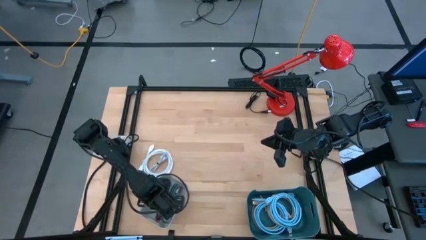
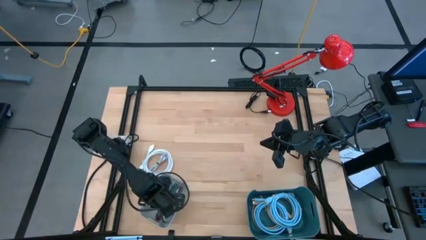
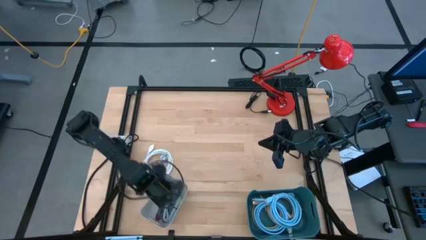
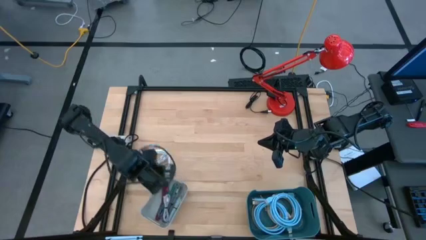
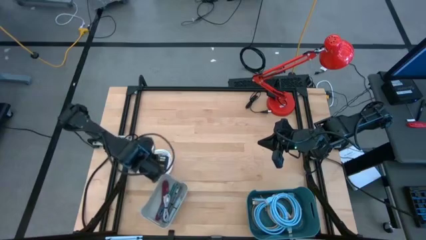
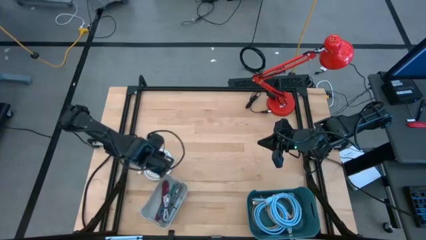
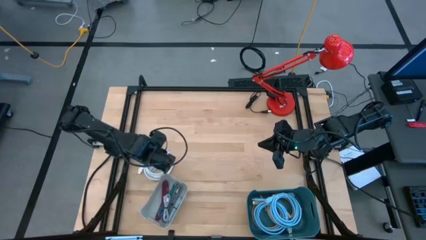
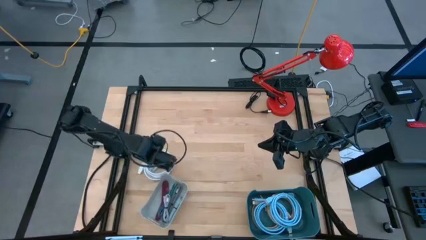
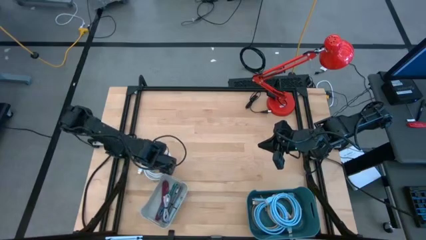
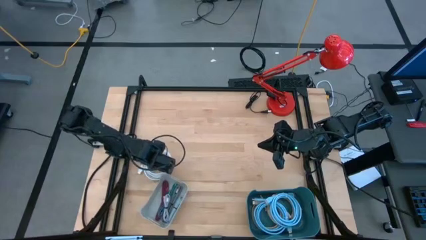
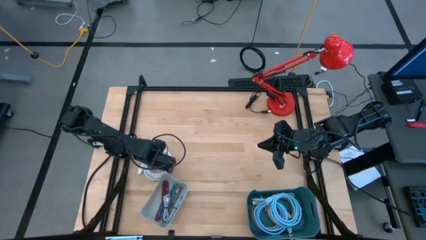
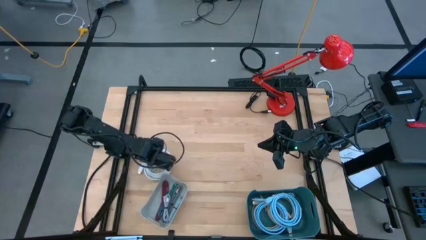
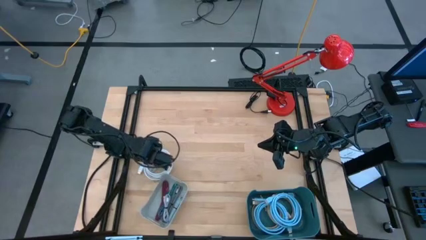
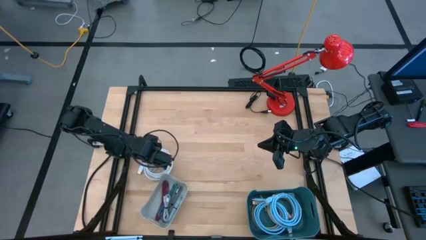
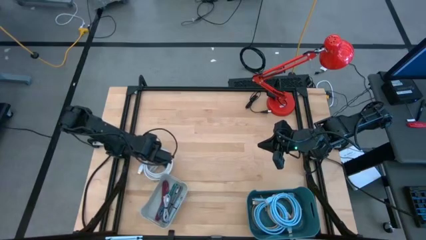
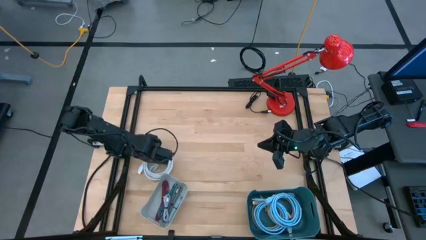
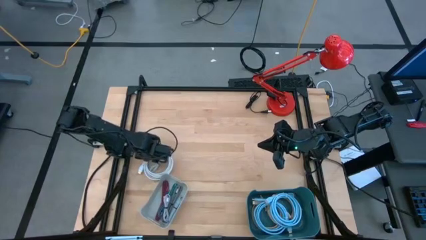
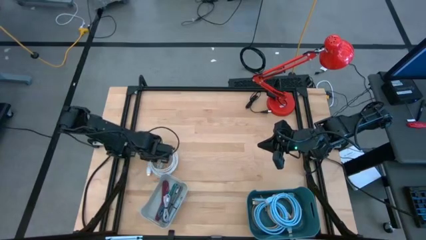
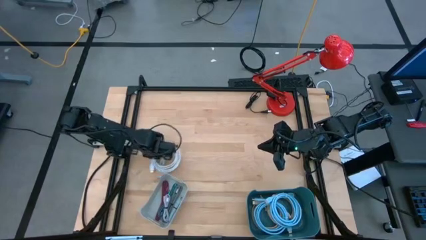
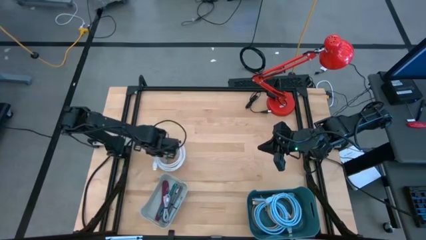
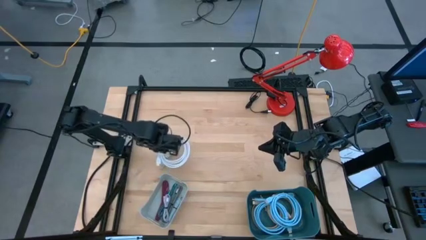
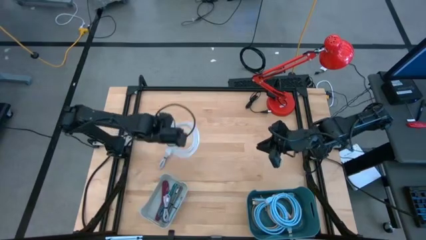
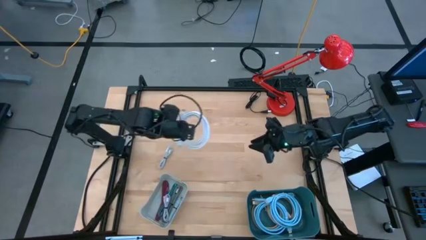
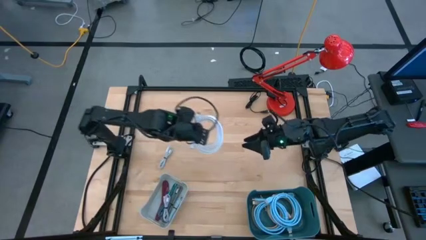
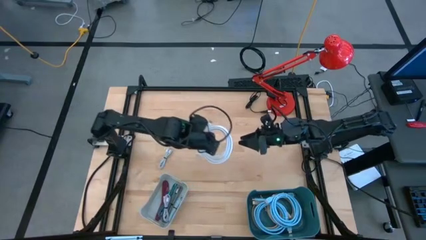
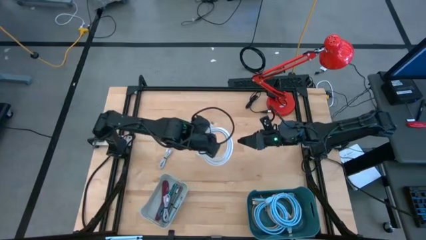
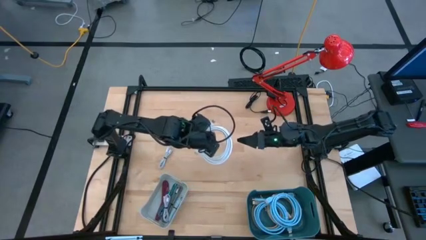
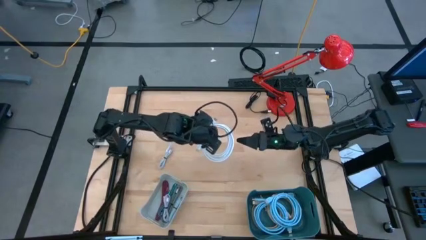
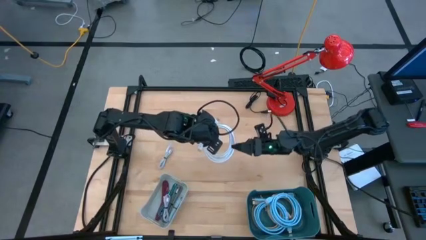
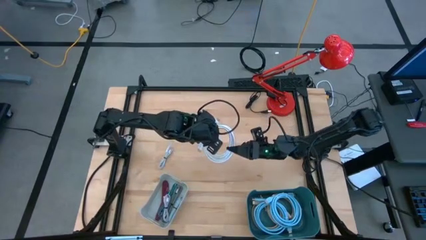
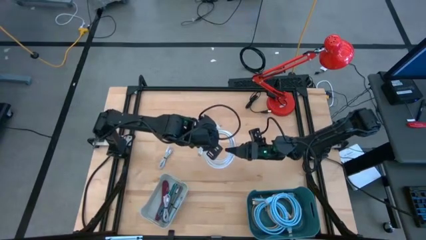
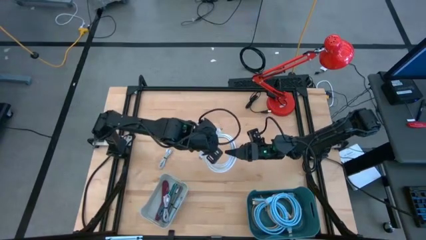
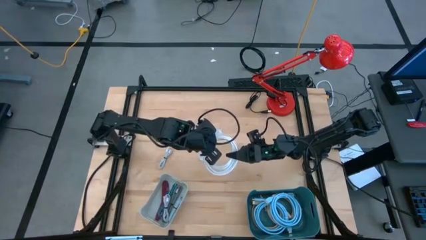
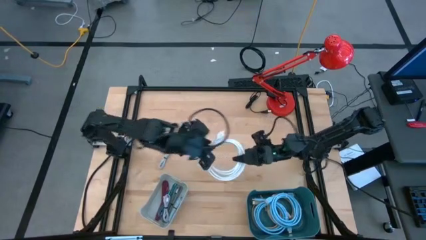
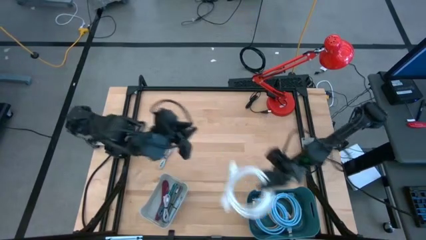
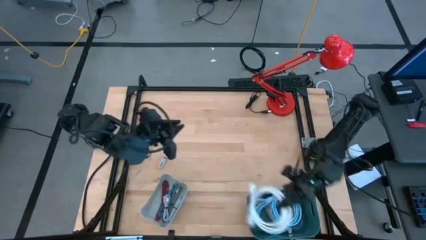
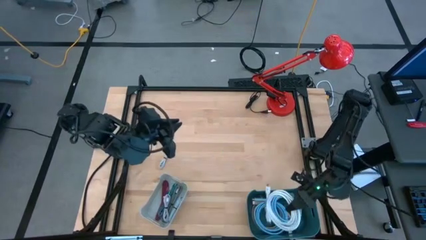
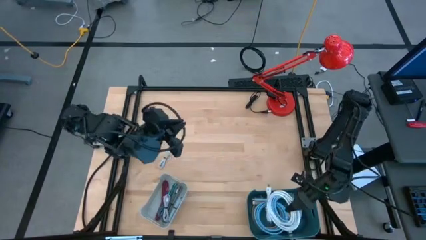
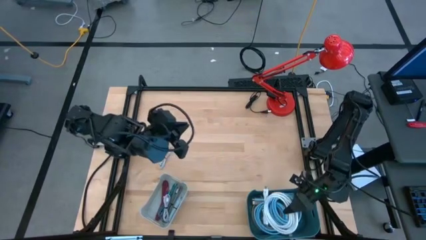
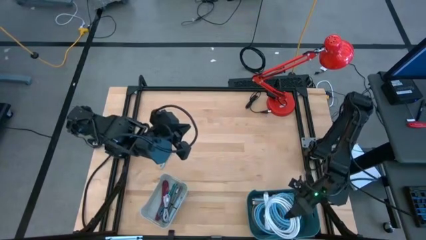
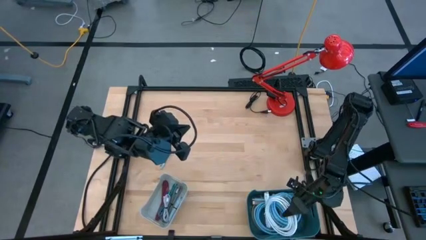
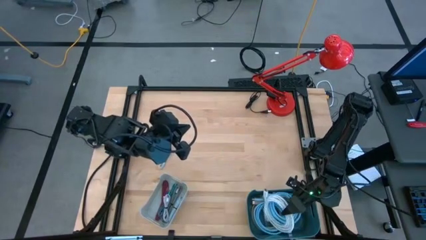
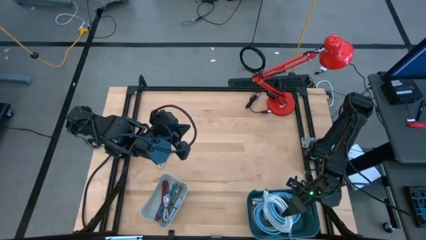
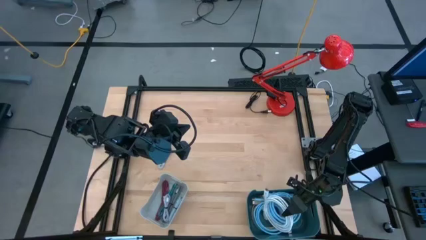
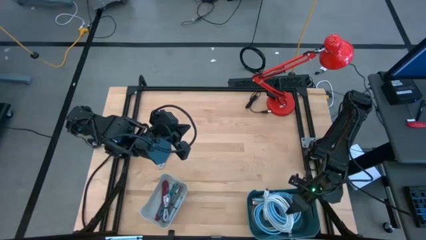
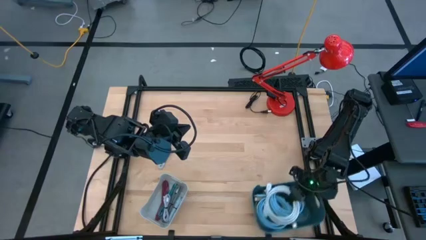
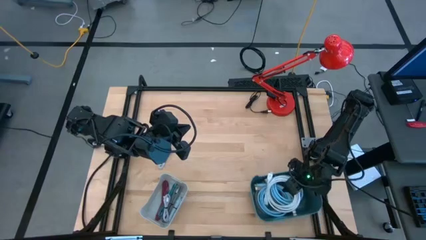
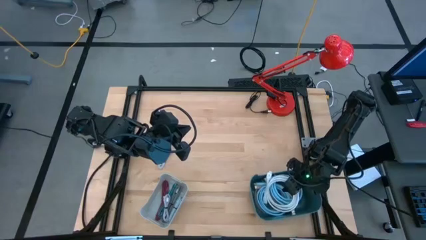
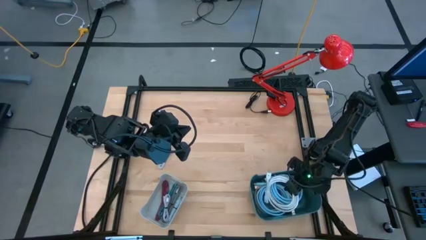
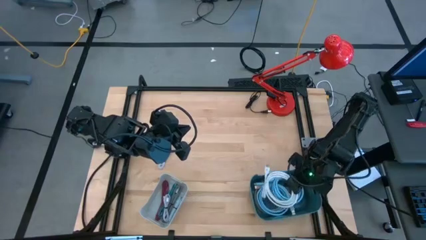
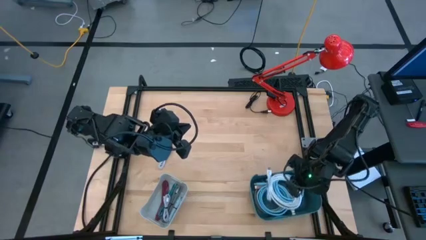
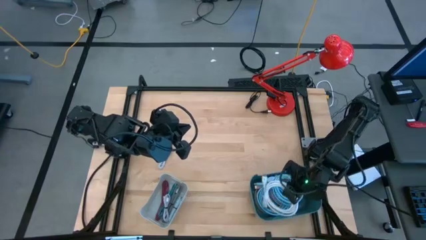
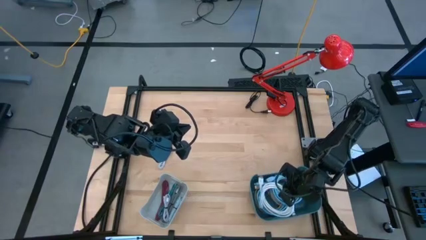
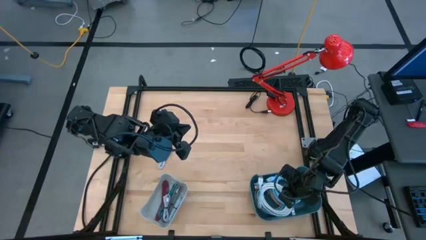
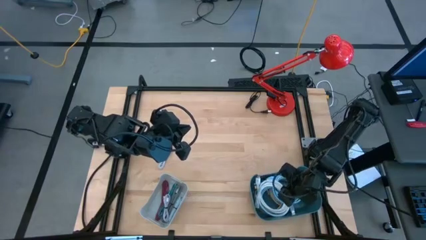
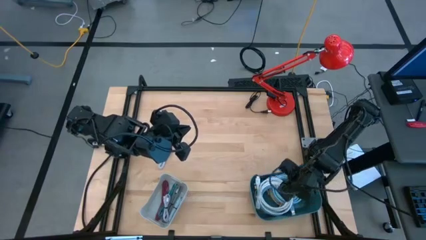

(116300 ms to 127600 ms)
Task: Pick & Place USB Port
Put the white display cable into the blue bin

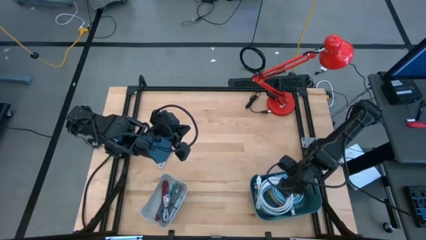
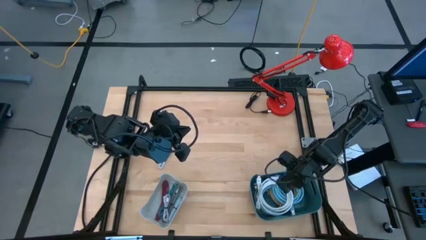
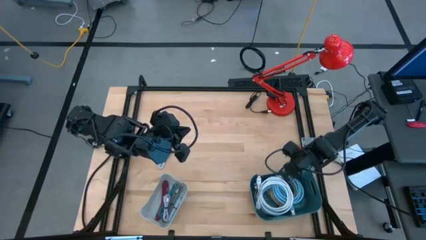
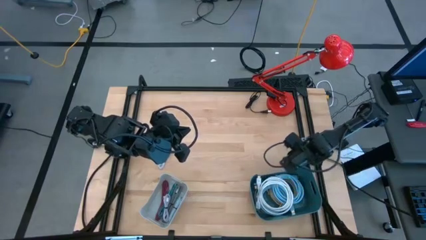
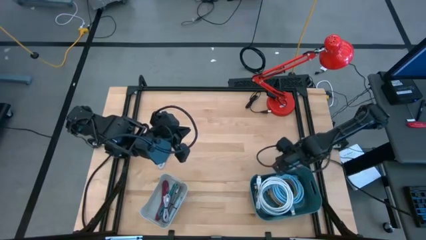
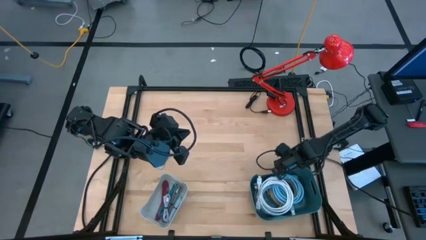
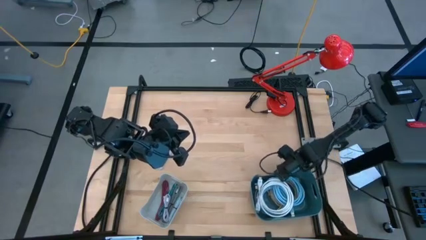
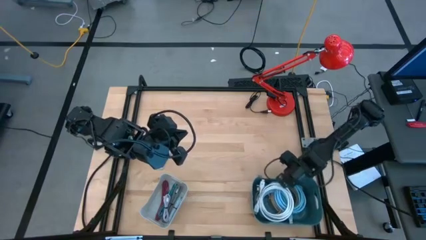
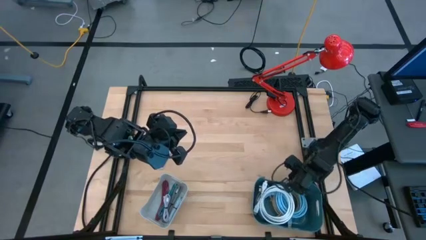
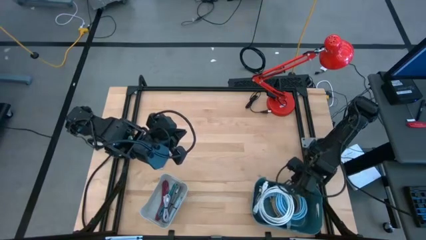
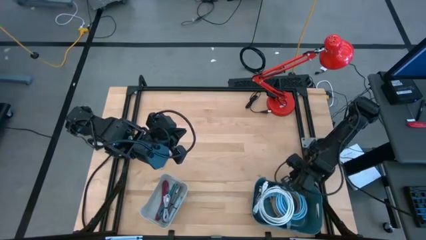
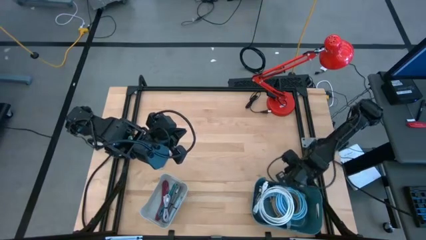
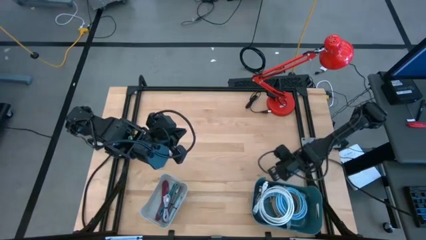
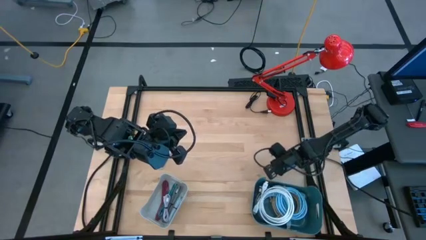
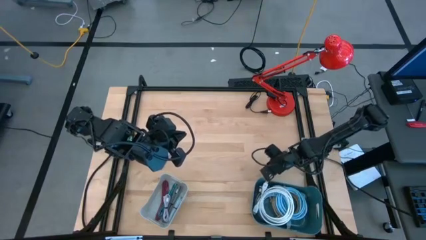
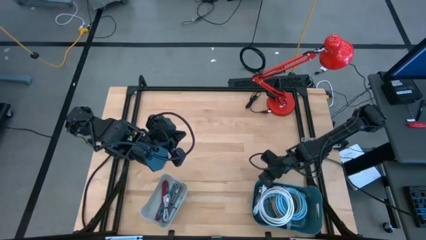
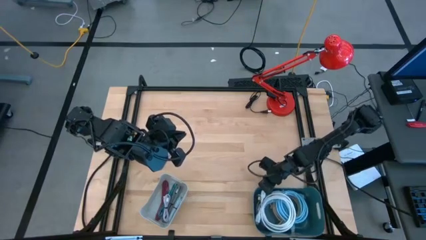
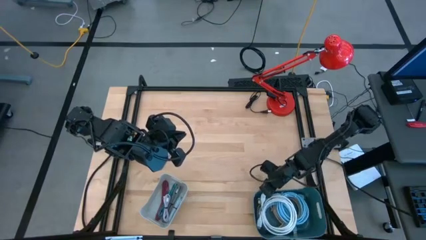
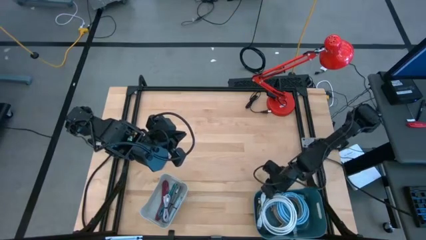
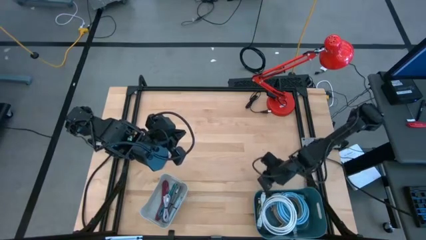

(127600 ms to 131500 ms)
Adjust the blue bin

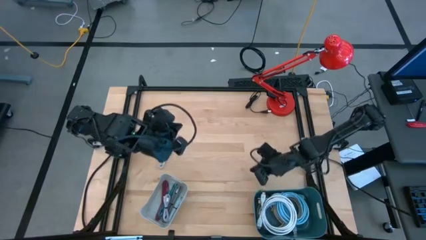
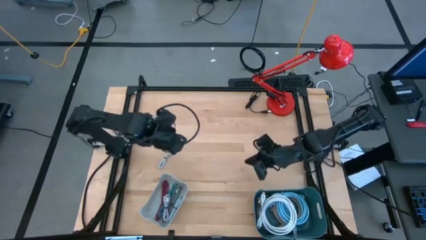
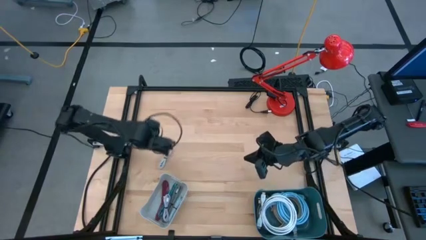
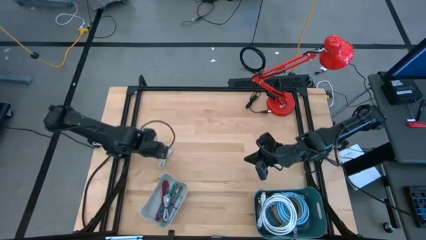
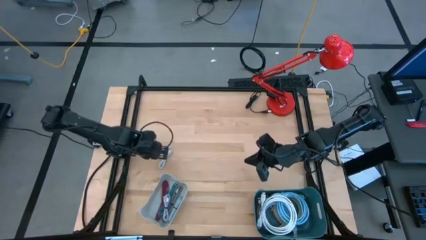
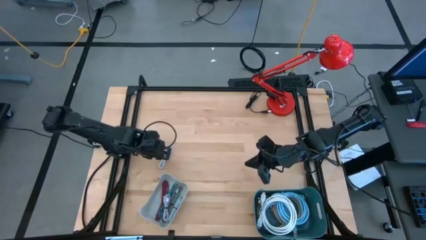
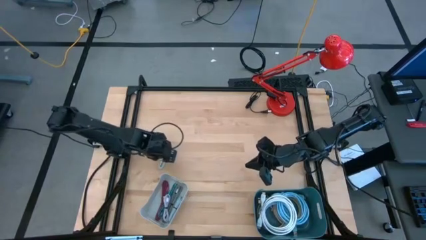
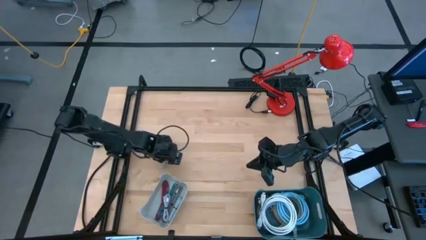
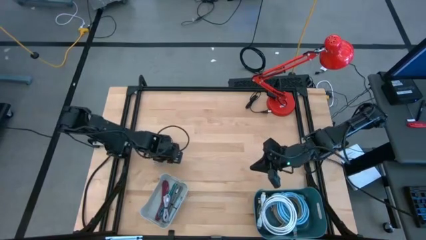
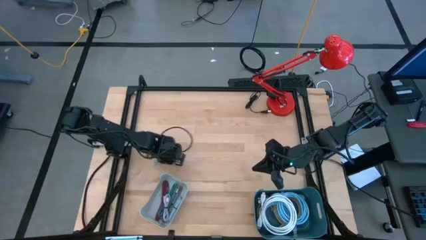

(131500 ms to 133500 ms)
Put the white charger cable into the gray bin
